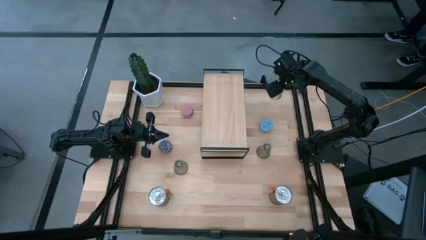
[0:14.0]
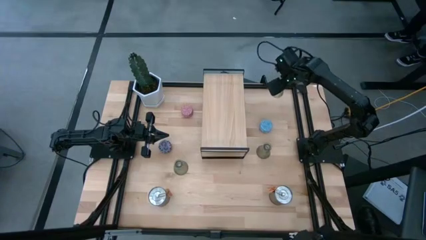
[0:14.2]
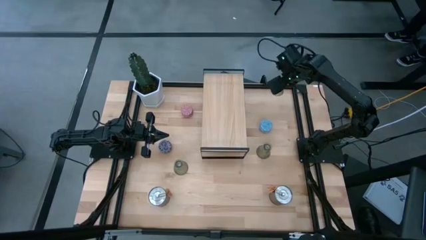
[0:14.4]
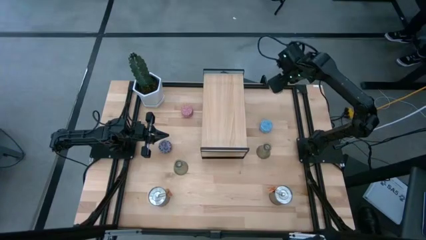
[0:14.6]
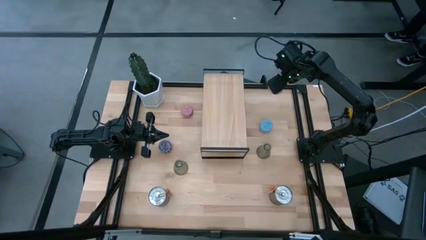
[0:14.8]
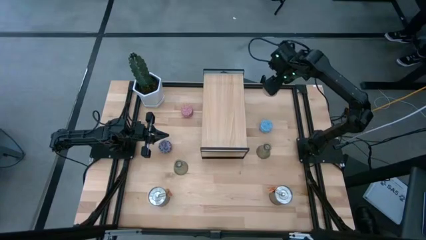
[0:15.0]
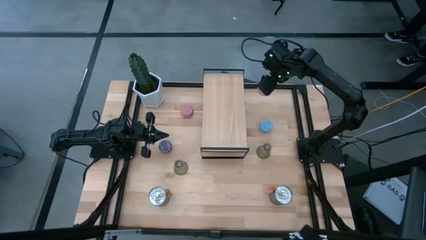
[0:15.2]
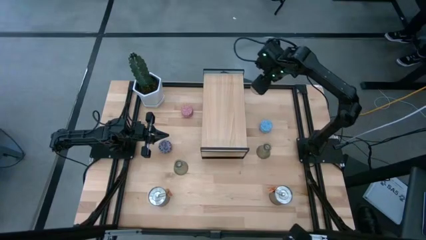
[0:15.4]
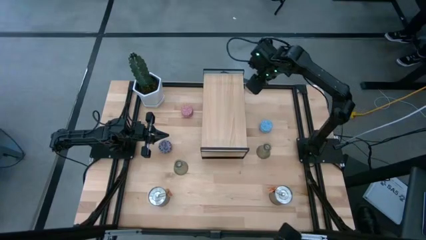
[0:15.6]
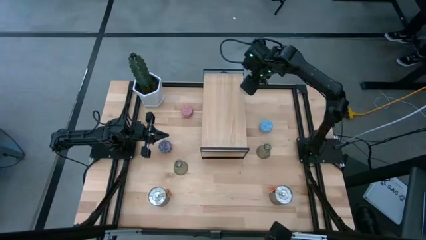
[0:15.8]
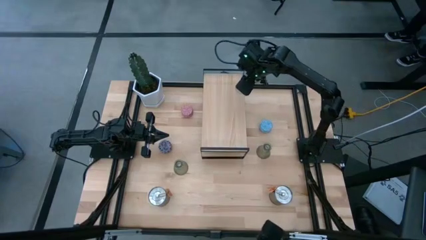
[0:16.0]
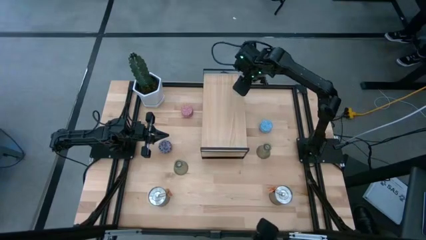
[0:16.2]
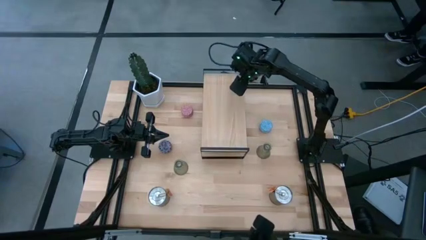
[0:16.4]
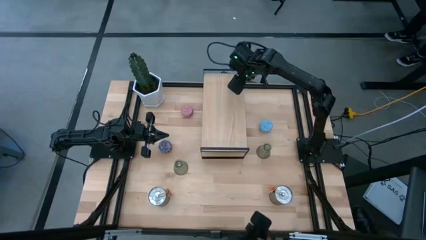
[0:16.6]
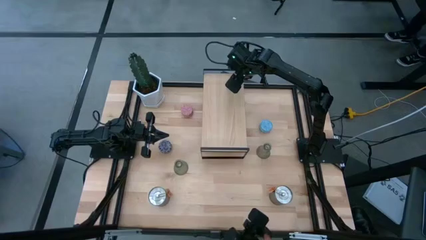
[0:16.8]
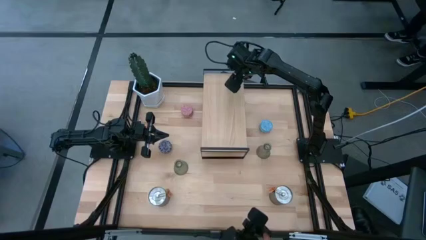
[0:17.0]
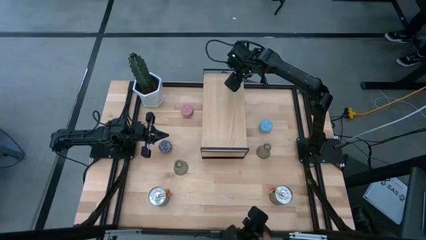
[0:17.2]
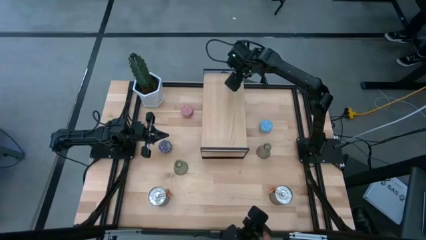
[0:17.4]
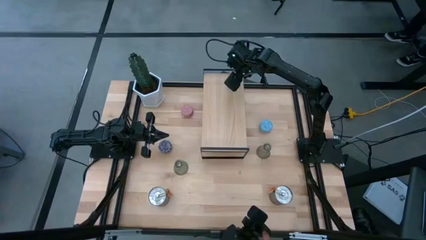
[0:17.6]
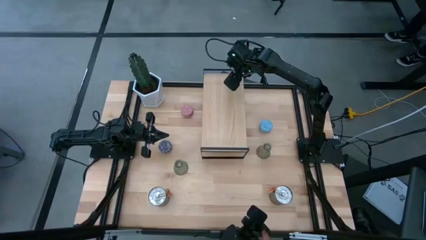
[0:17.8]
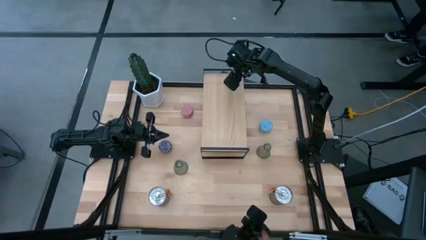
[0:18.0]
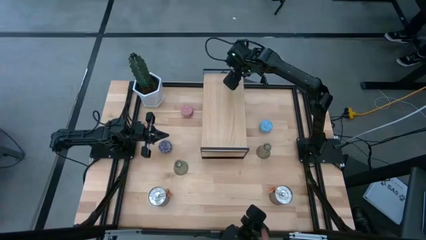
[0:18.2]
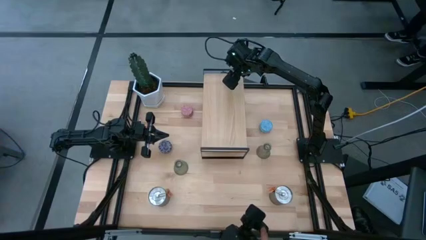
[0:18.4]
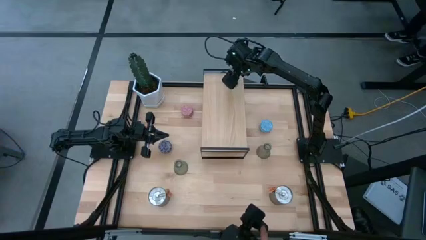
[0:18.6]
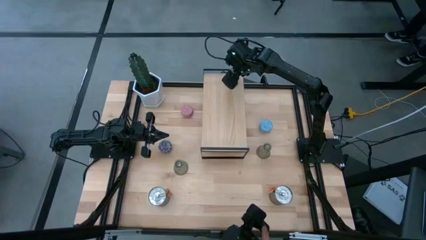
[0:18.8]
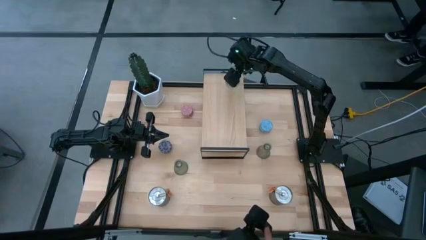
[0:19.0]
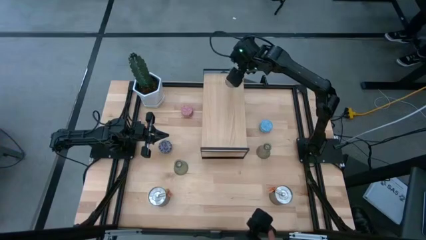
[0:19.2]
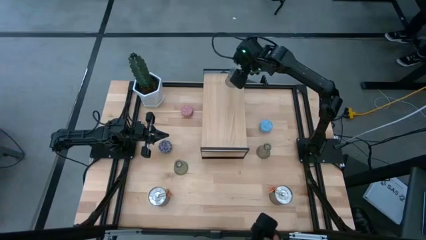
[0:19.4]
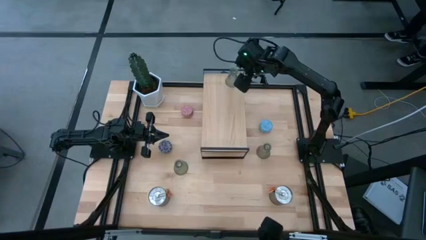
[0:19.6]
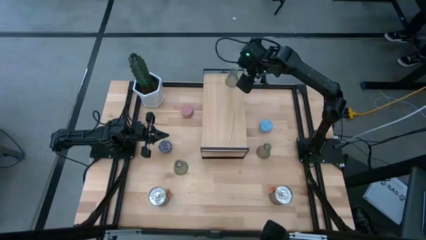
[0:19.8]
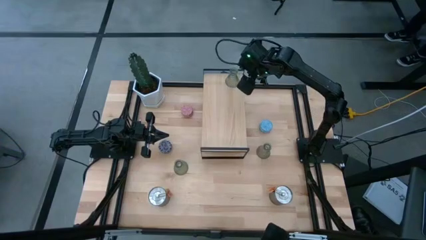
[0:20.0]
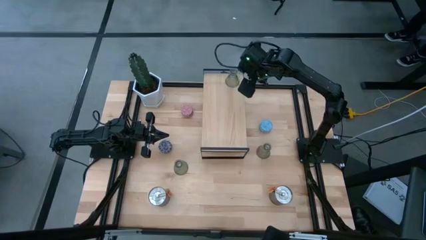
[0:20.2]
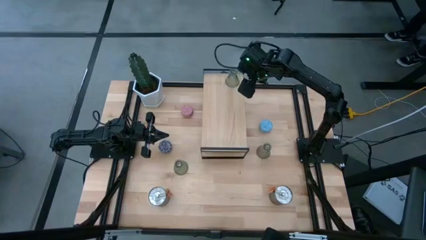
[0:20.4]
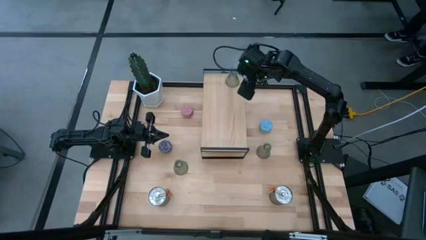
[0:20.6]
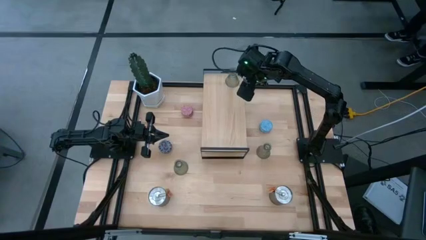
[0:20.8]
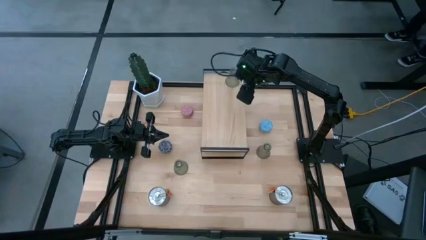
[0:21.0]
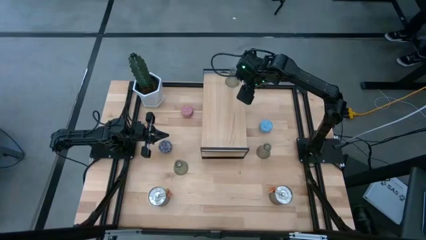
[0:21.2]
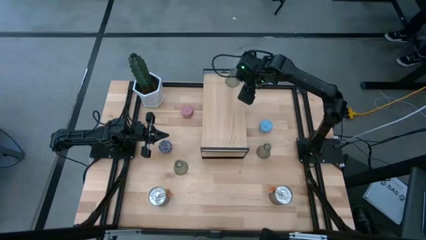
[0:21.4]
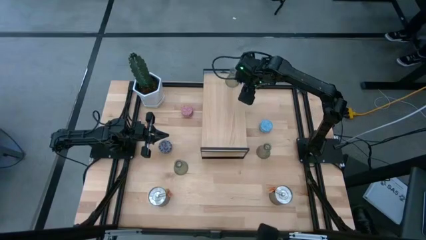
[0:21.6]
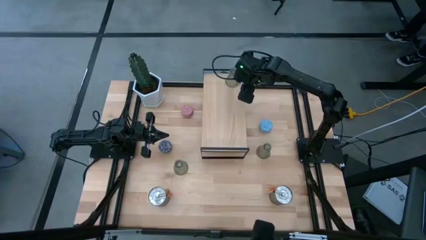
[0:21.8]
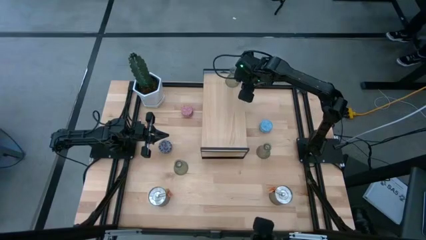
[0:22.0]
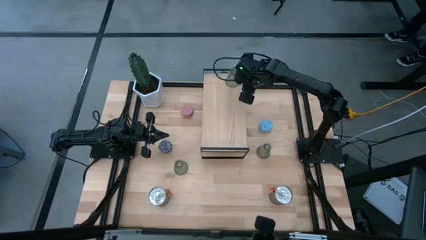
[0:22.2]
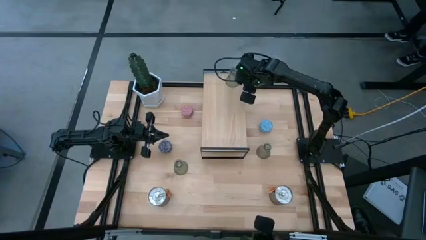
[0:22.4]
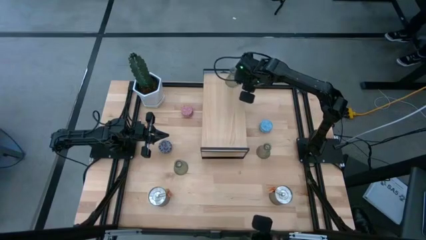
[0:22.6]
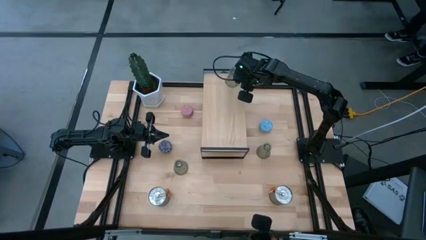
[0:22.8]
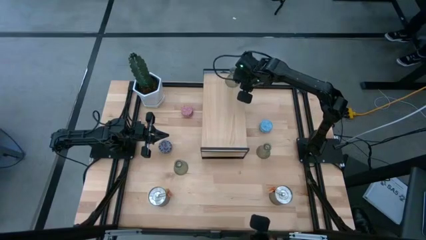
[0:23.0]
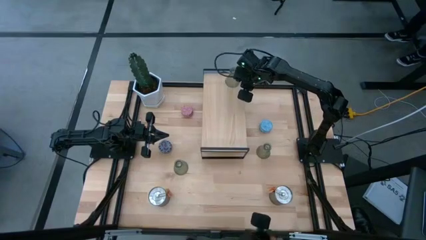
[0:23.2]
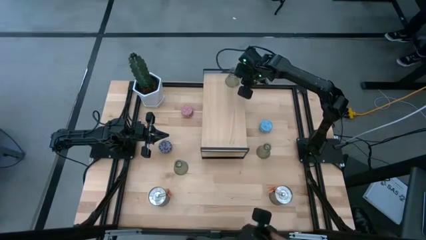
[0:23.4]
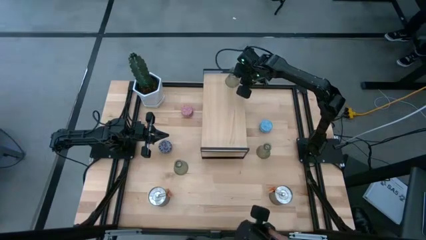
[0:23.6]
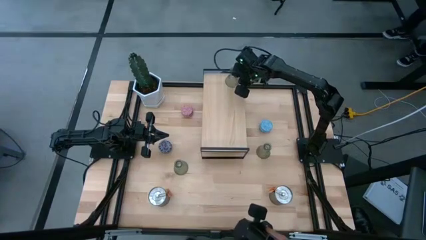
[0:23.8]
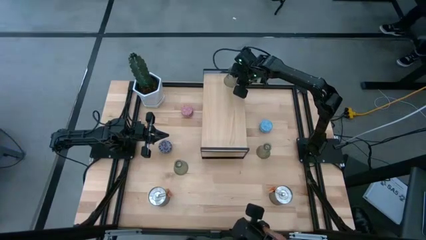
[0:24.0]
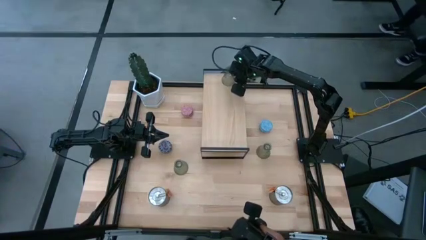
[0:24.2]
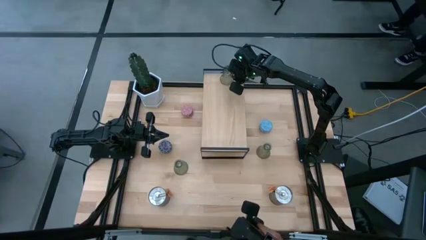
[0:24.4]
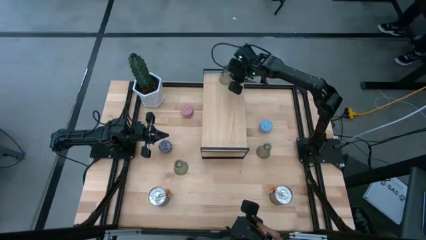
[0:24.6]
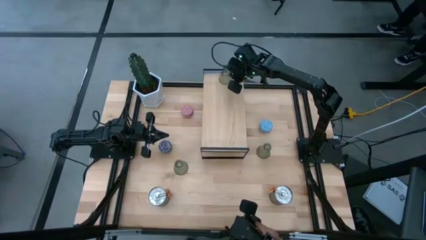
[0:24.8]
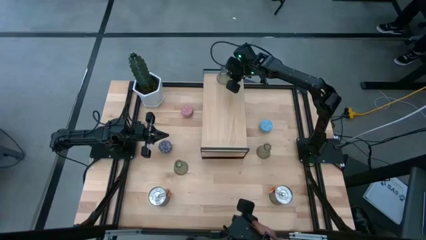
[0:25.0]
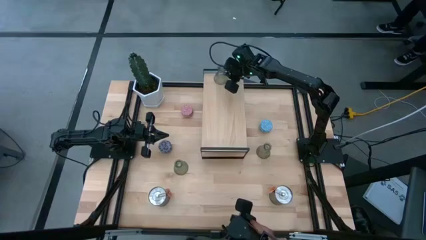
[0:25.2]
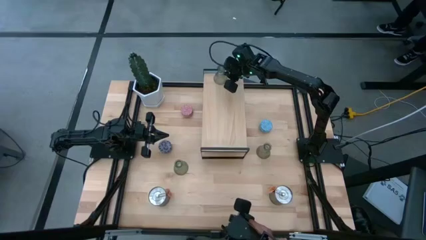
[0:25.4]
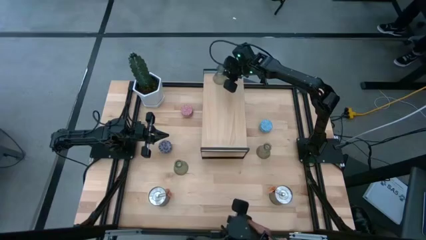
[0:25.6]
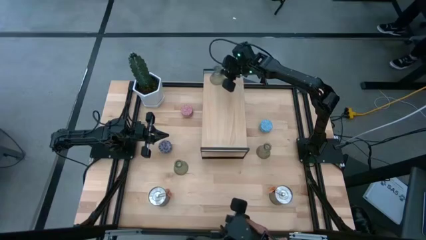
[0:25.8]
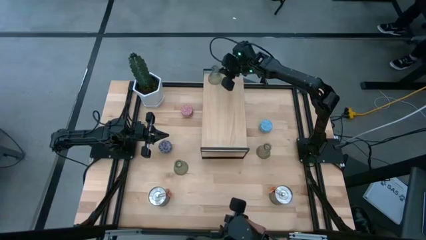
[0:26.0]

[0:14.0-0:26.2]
Task: Pick & Place candle stick holders
Put the top transparent candle holder on the shelf

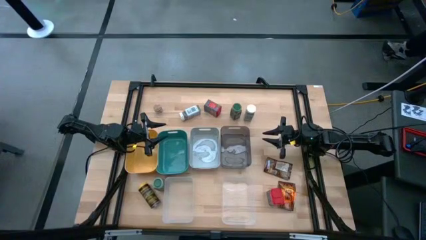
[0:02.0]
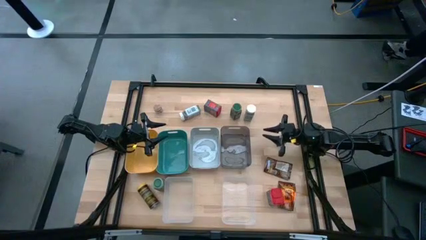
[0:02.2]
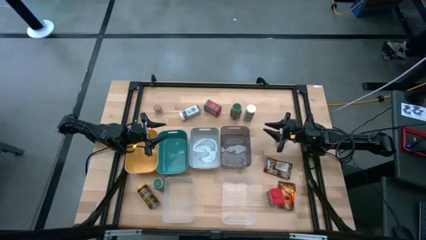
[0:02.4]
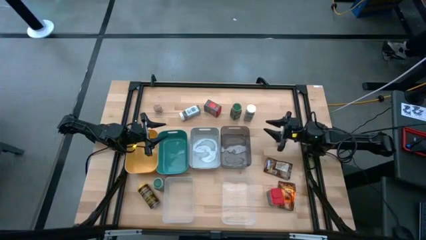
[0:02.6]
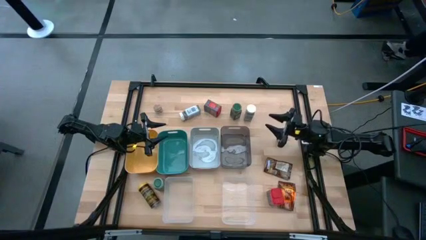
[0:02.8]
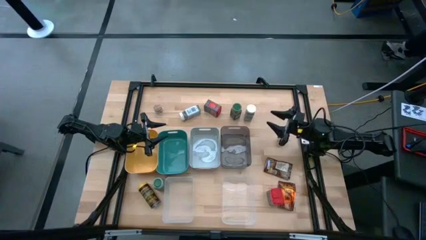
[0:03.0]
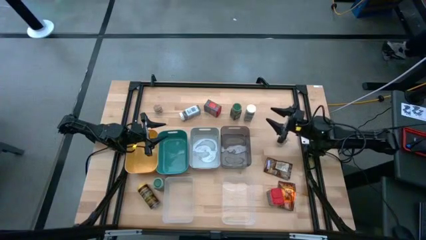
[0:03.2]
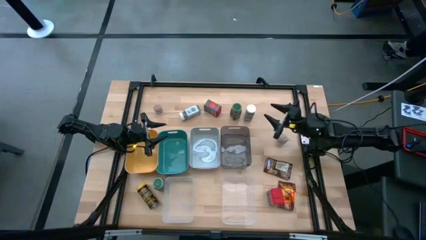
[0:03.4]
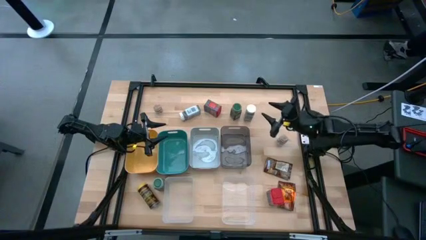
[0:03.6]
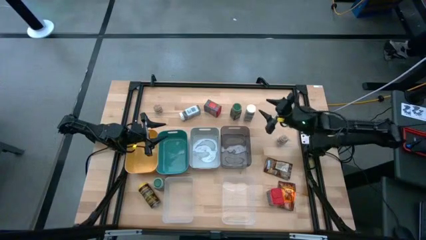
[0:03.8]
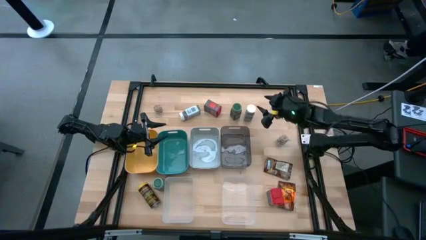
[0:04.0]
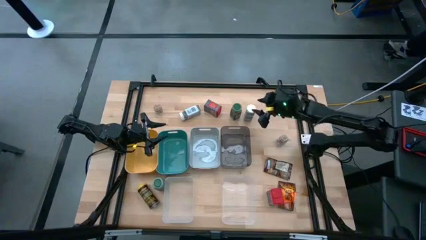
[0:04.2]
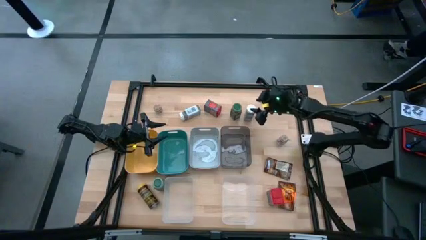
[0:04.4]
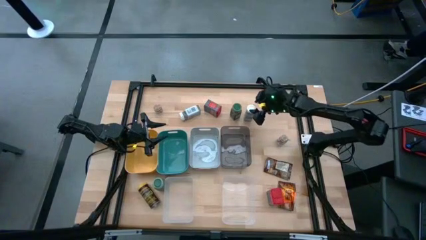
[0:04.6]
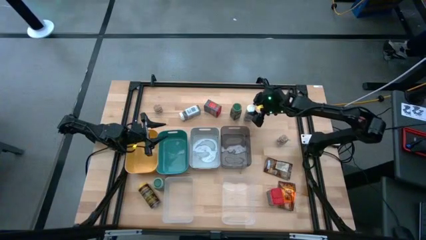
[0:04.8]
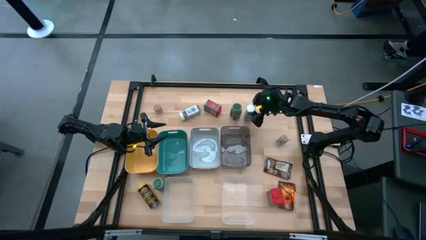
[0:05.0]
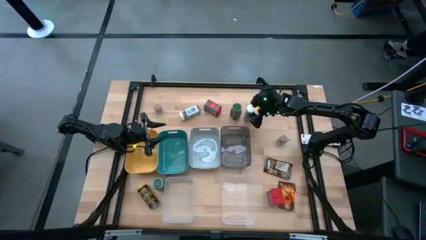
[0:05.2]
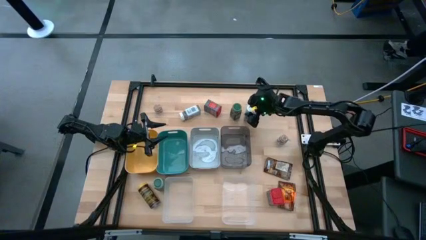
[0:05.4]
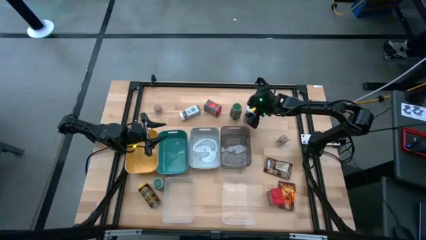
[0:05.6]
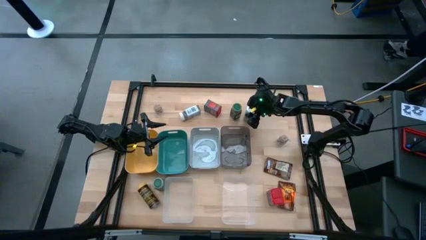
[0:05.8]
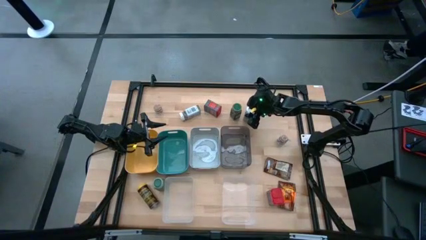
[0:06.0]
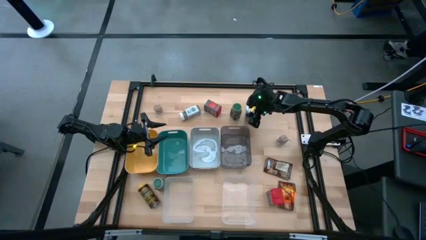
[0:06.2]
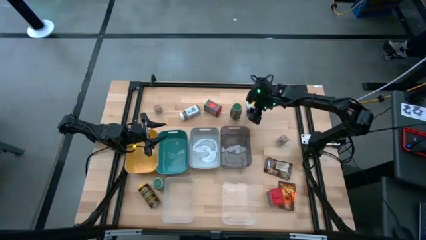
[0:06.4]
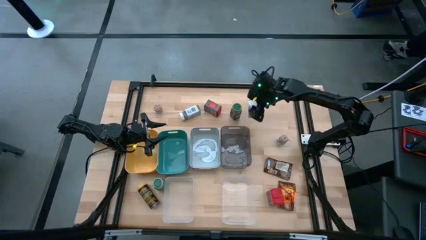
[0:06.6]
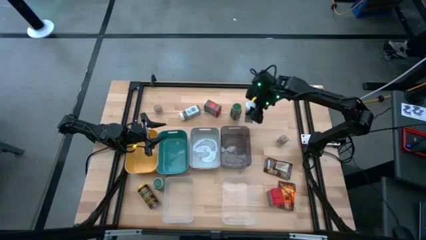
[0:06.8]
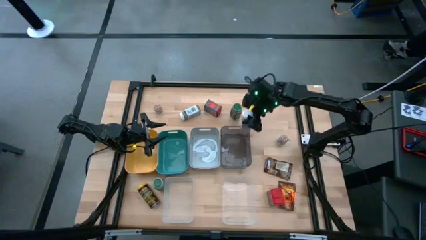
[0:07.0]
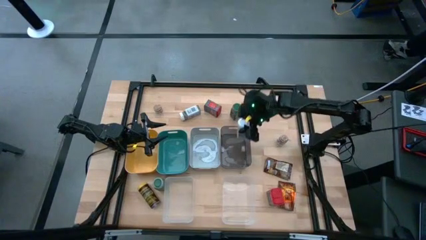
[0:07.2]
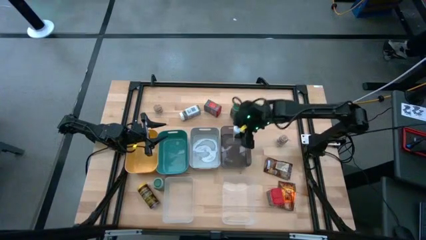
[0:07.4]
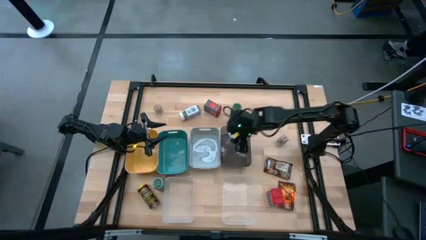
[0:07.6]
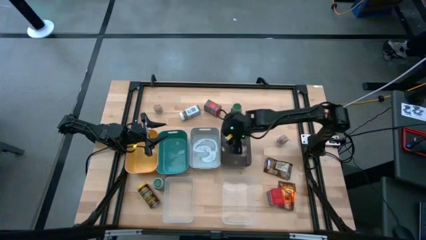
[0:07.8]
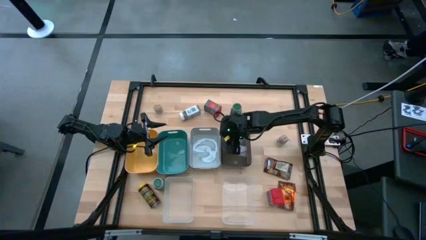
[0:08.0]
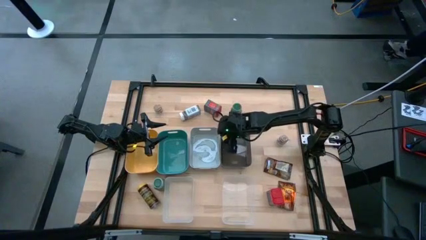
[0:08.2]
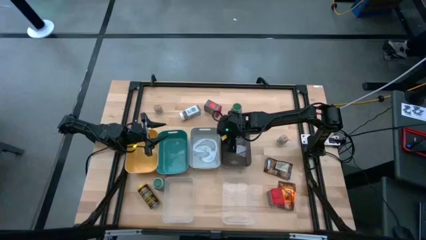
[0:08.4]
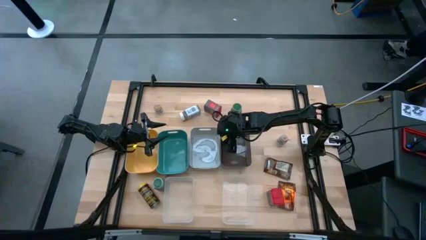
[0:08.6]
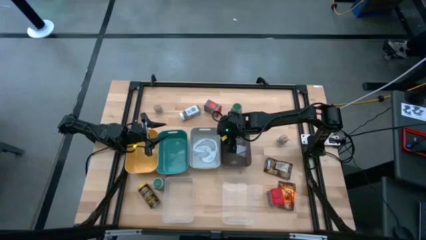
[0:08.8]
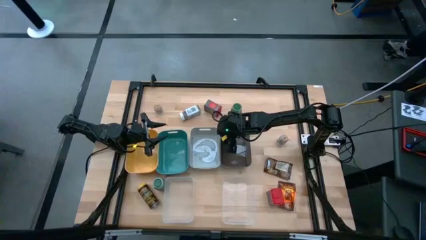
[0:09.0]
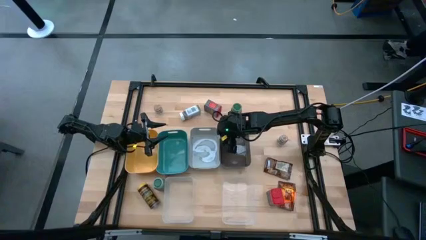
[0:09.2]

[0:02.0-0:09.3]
Task: Sort spices by type
Put the right white seasoning bottle into the transparent black bin
